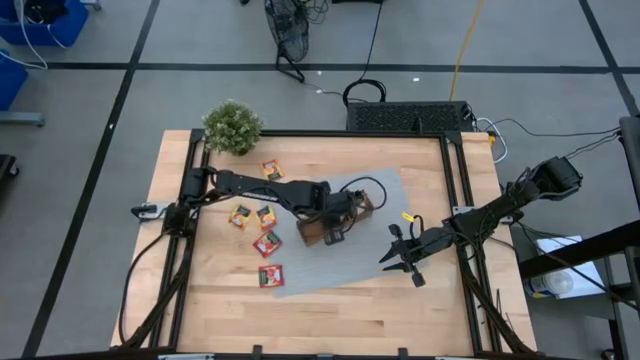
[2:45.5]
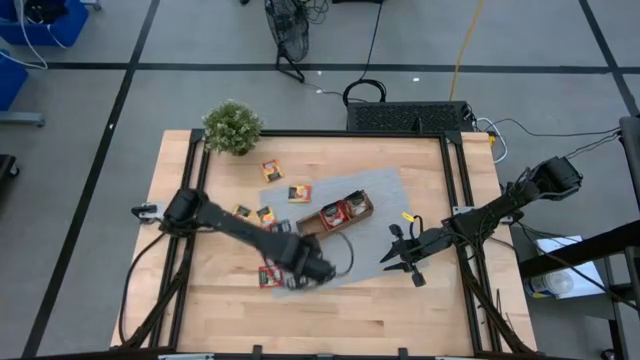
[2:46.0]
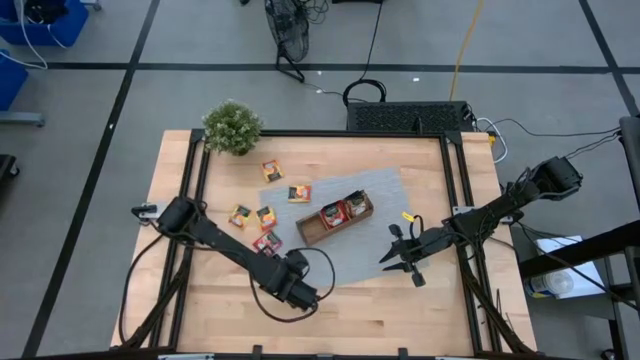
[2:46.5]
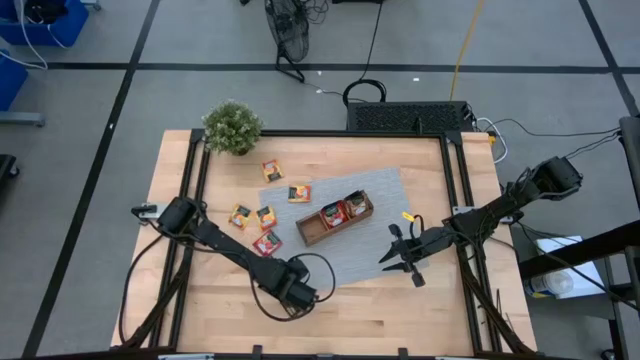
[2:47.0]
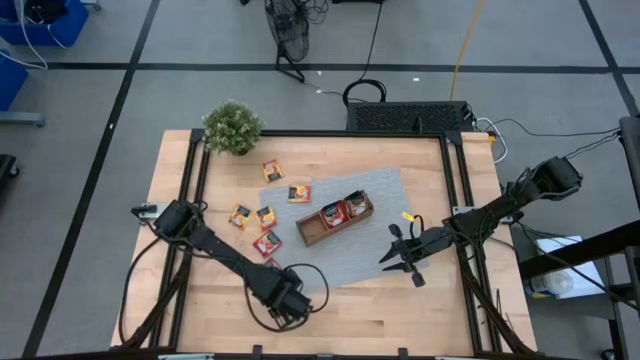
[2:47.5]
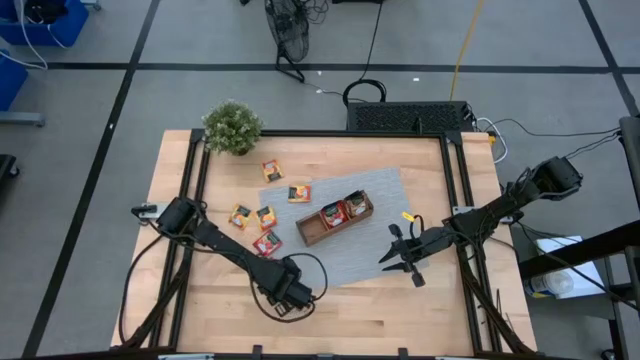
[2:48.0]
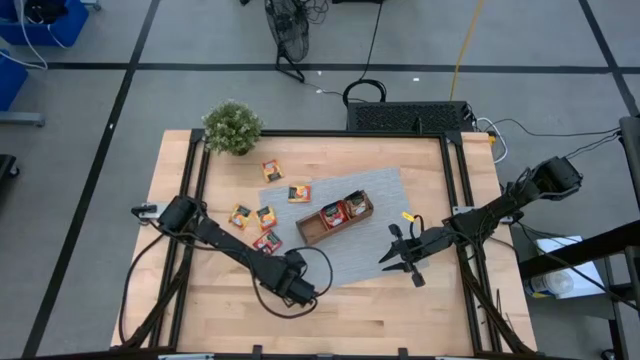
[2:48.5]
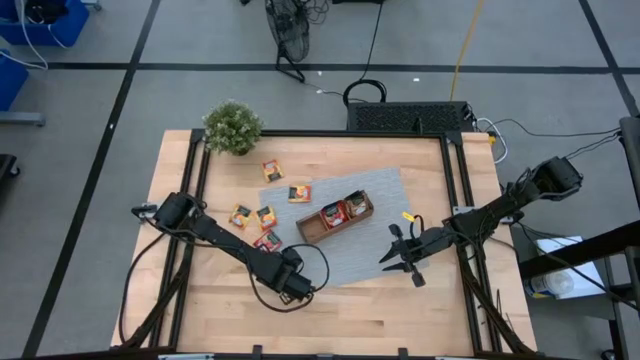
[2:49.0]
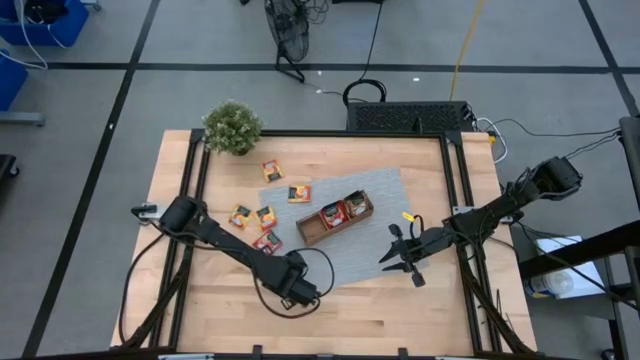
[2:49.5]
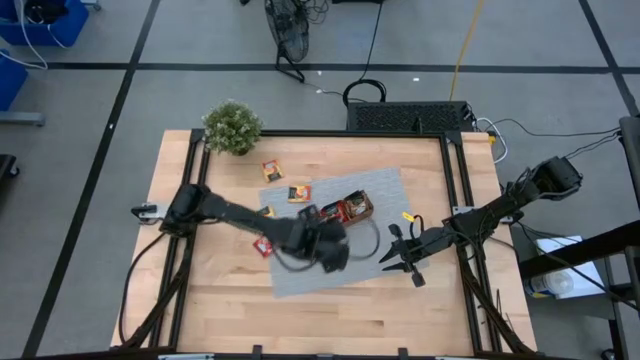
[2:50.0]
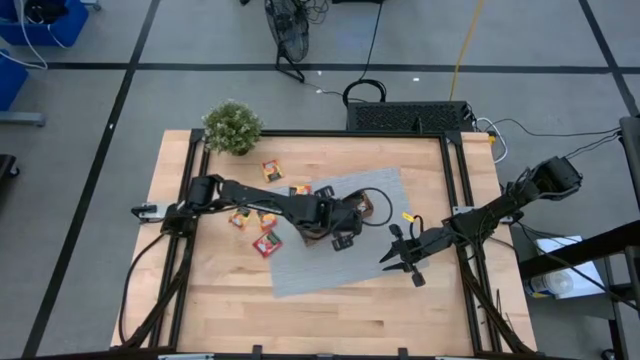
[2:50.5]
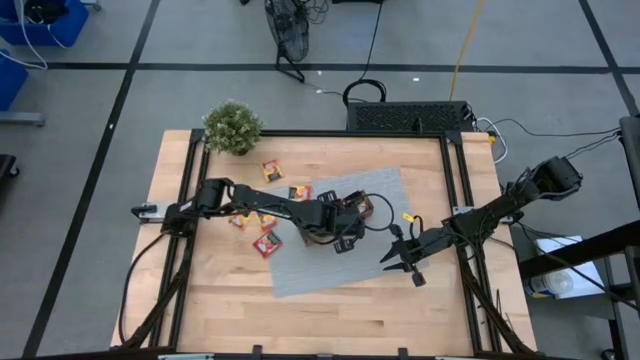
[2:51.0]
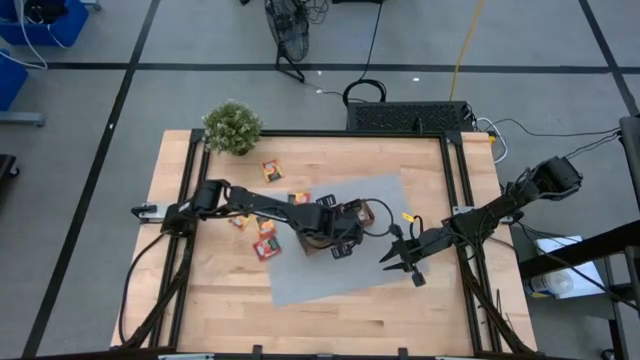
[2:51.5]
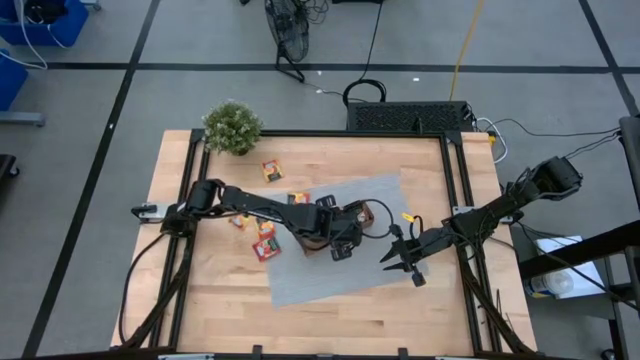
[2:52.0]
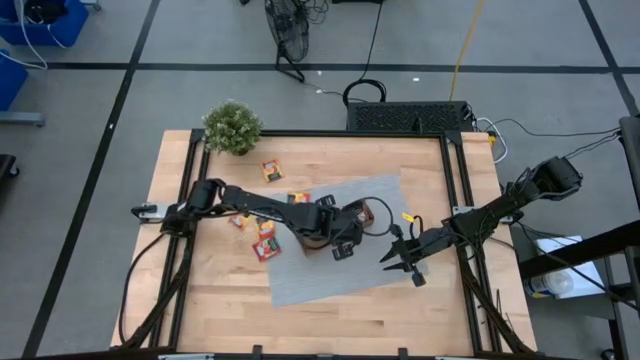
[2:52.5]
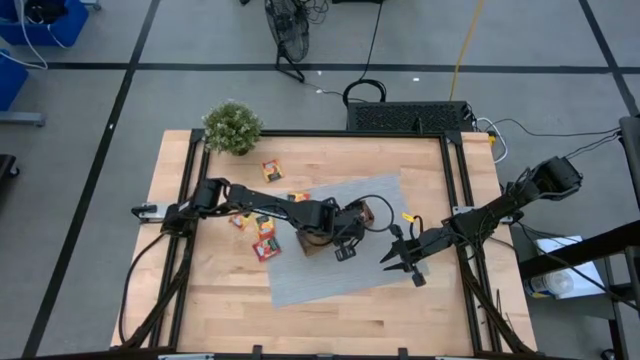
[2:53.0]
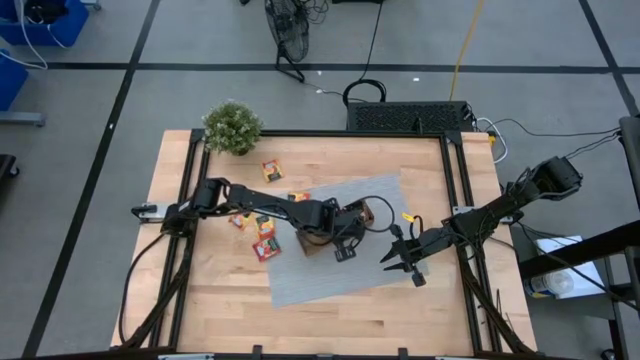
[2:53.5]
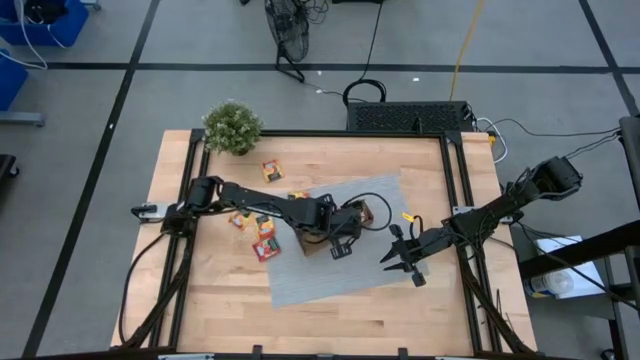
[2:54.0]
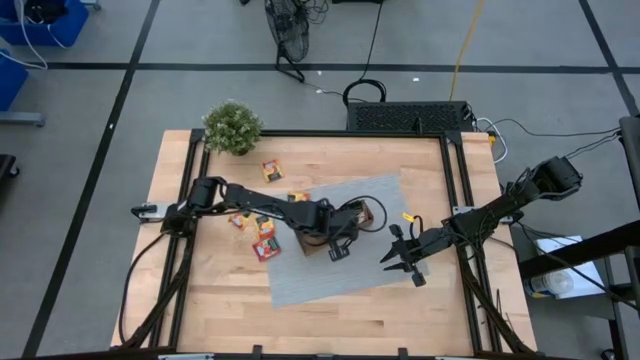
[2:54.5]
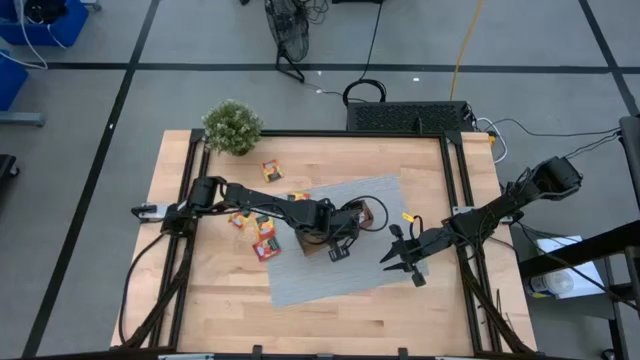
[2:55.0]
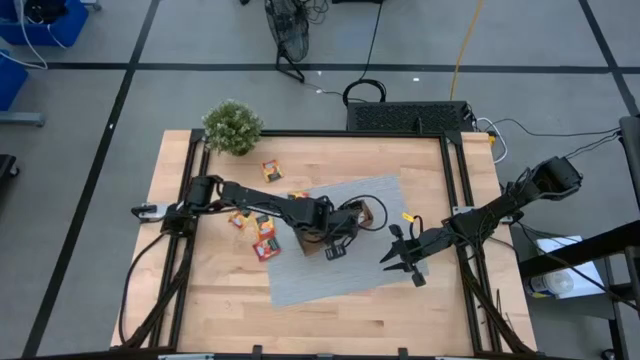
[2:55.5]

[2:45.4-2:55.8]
Task: Pick & Place Tea
Put the red tea bag into the middle section of the wooden organizer

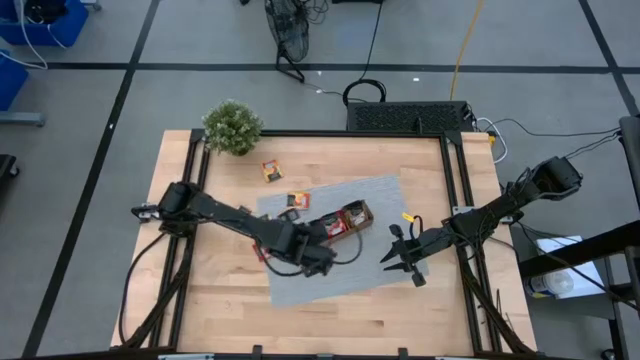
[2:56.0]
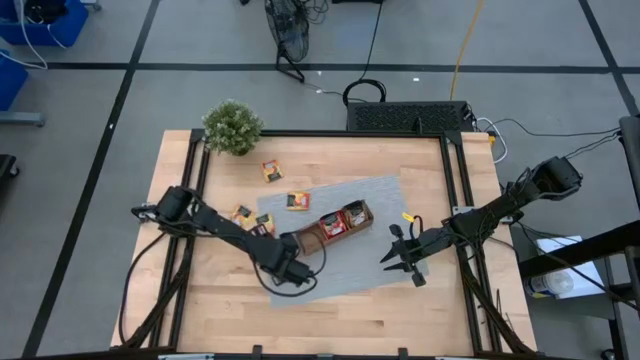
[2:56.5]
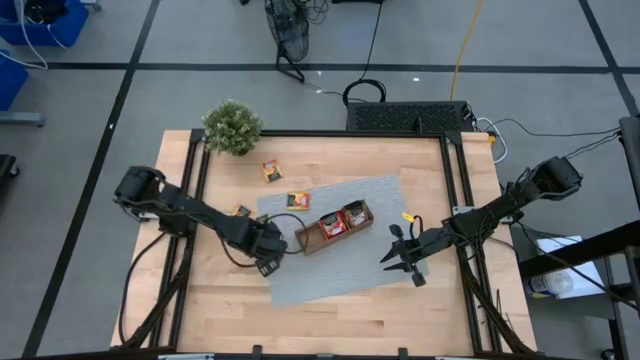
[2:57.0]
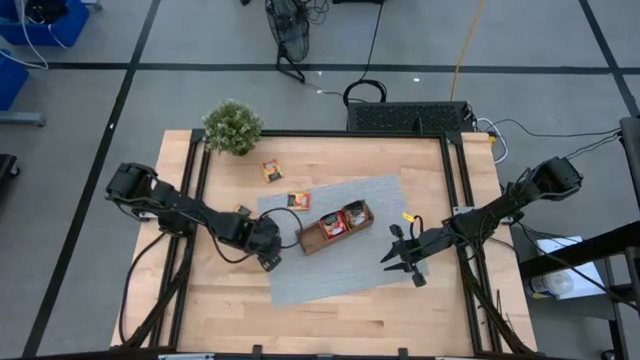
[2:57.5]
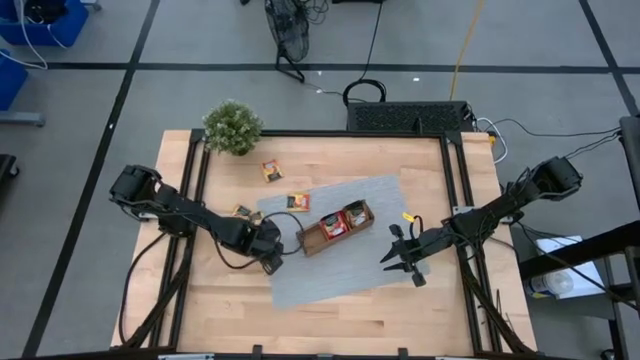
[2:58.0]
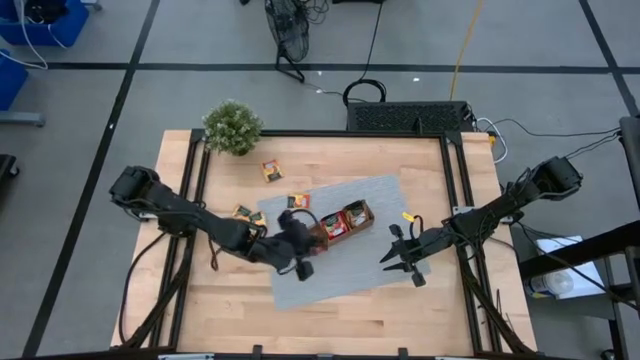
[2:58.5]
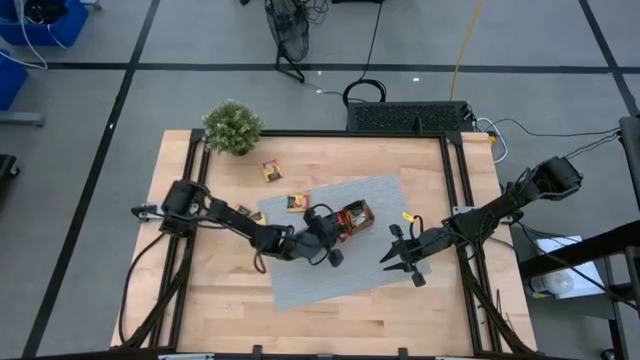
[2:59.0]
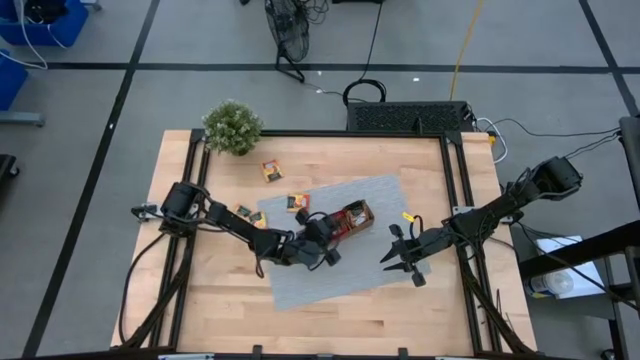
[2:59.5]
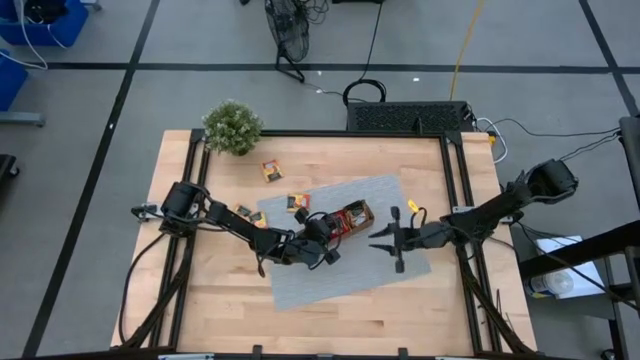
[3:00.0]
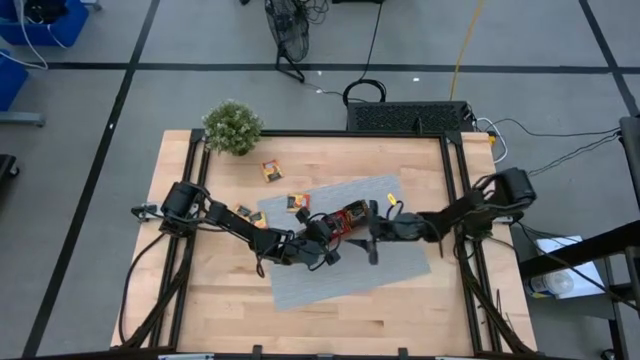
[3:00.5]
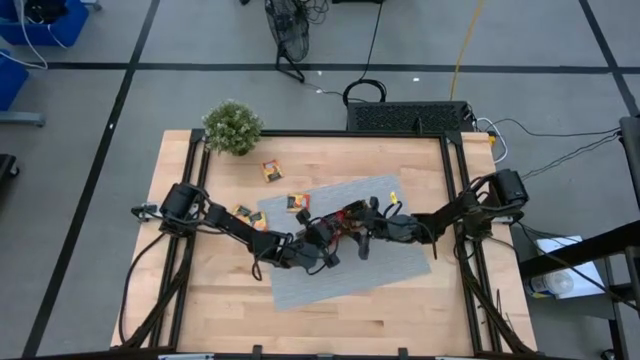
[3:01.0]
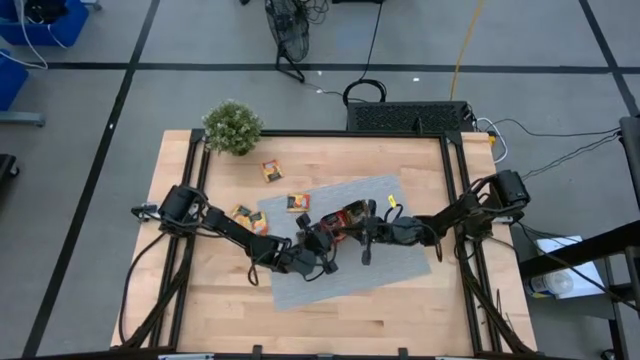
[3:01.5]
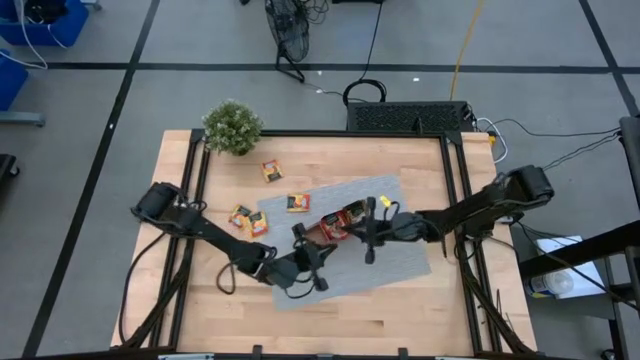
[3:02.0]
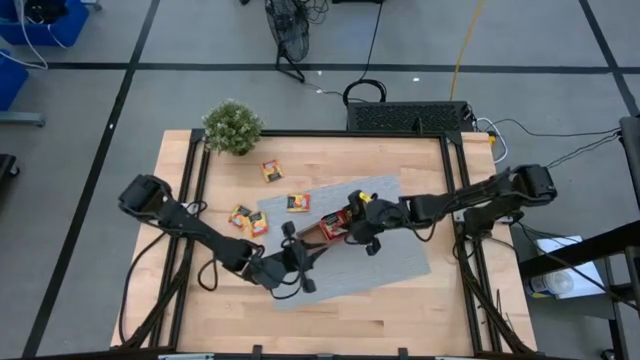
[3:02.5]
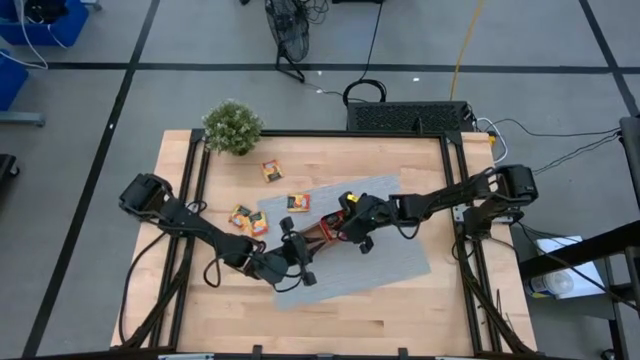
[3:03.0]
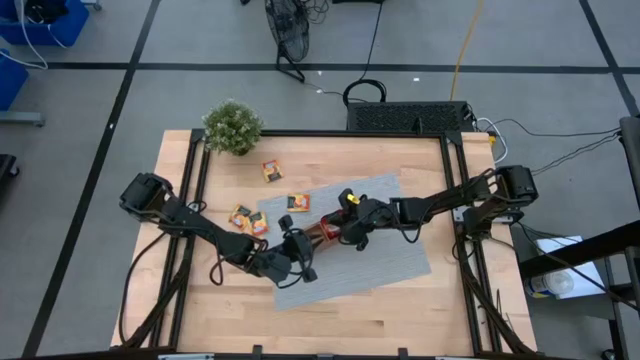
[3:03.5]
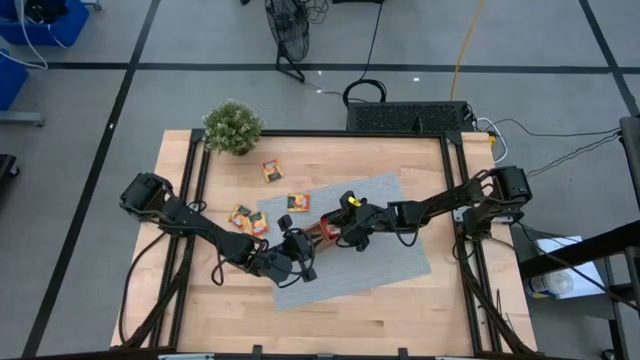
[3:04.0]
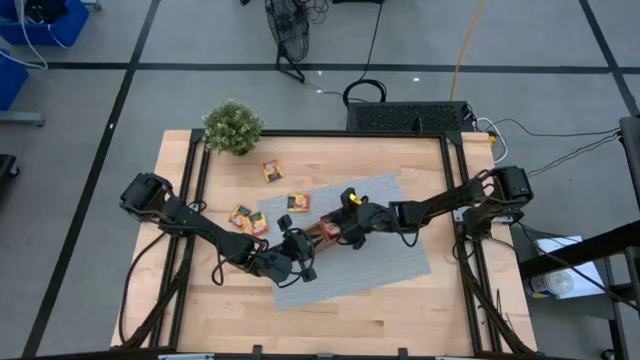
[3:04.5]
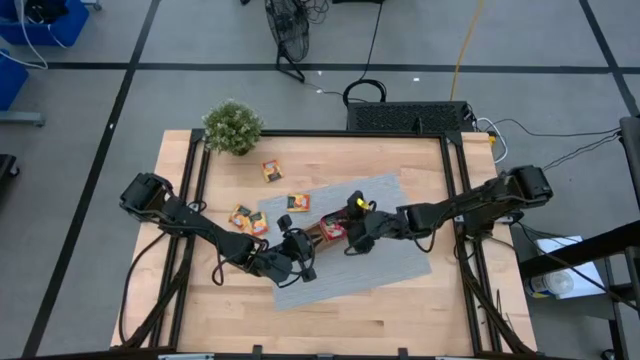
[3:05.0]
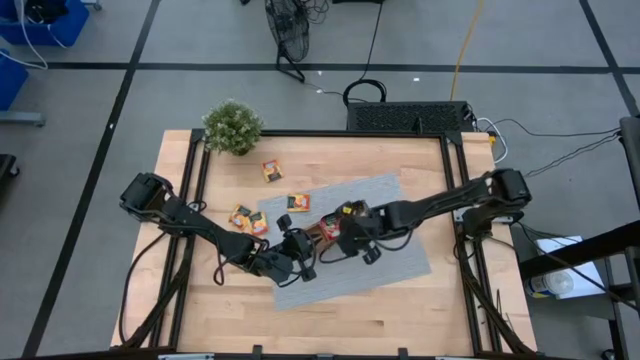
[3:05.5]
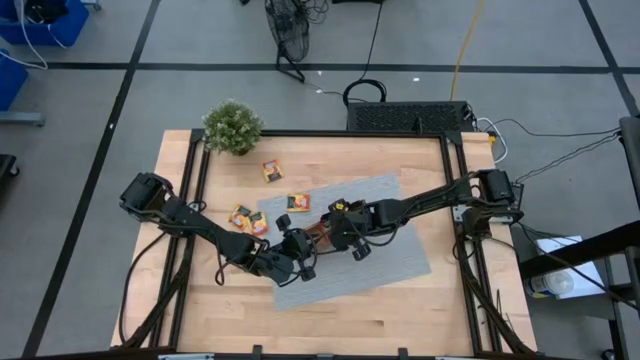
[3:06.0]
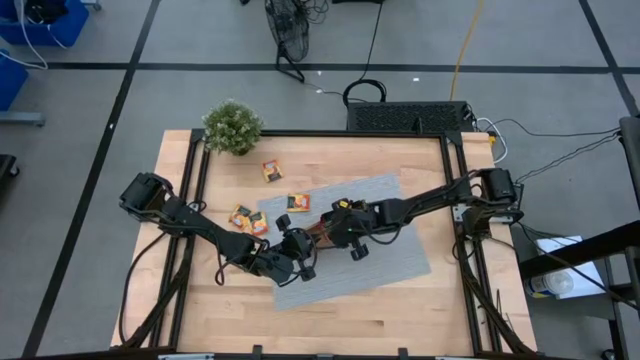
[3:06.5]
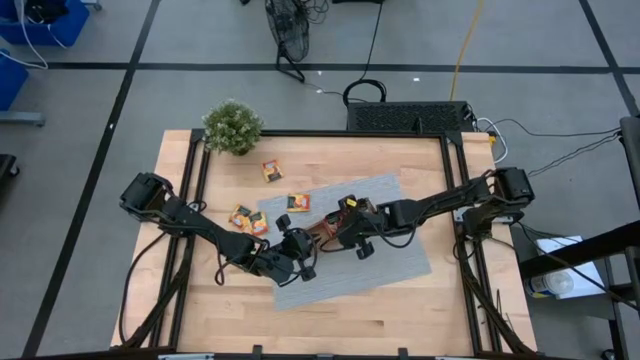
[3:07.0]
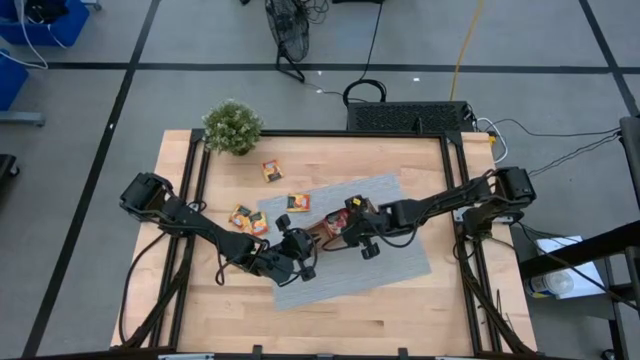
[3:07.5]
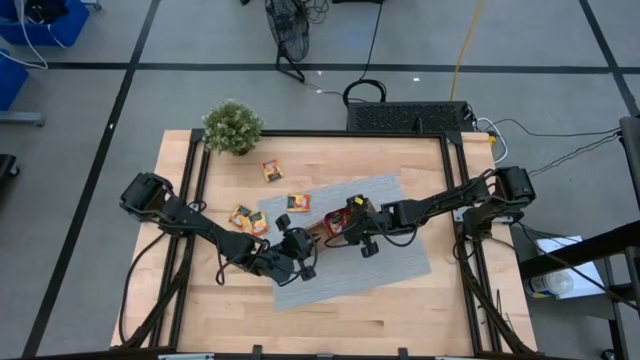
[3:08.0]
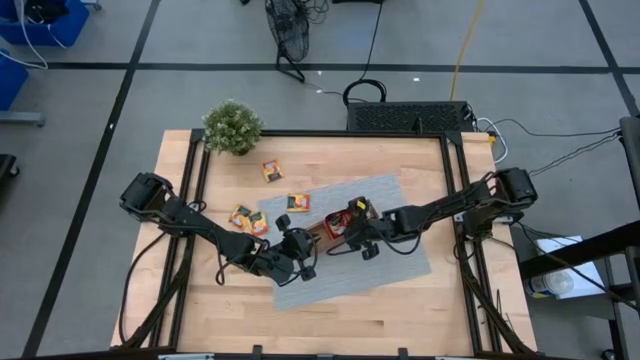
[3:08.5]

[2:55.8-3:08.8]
Put the red tea bag into the middle section of the wooden organizer
